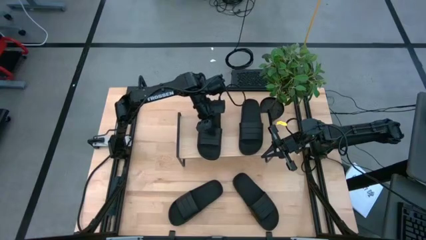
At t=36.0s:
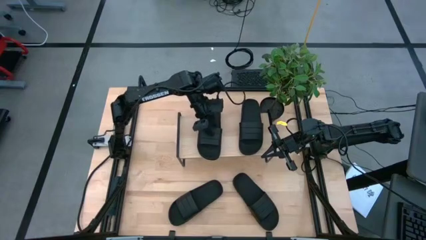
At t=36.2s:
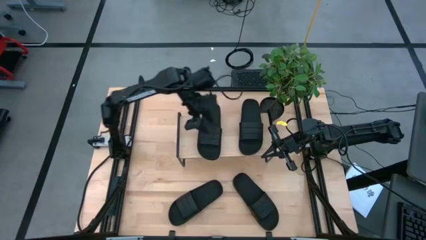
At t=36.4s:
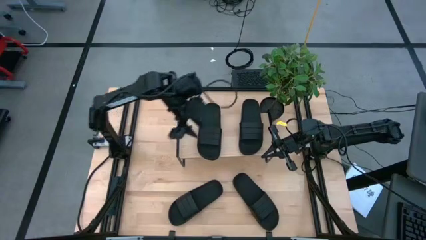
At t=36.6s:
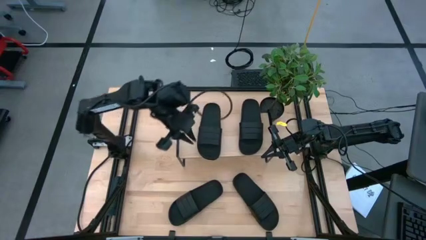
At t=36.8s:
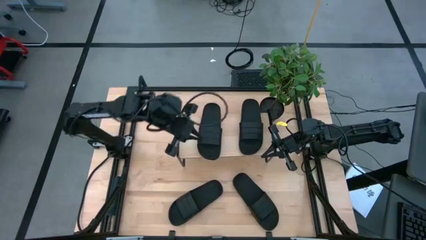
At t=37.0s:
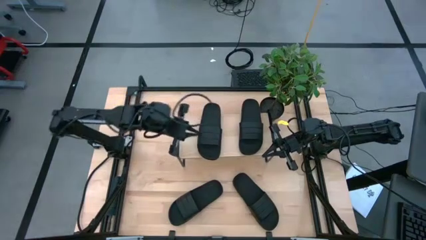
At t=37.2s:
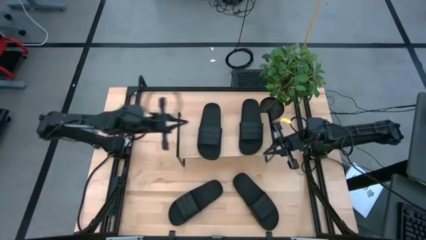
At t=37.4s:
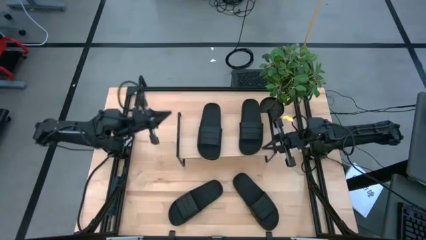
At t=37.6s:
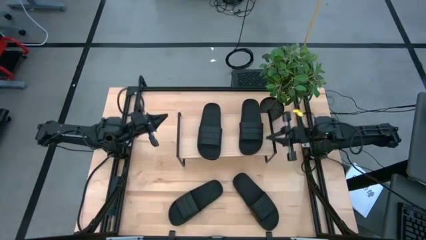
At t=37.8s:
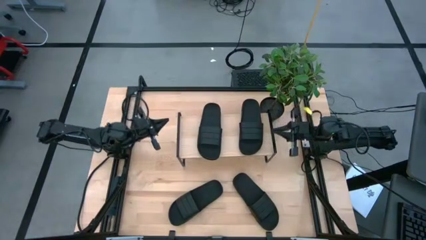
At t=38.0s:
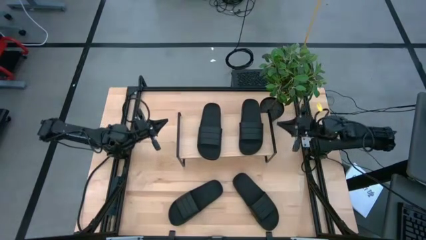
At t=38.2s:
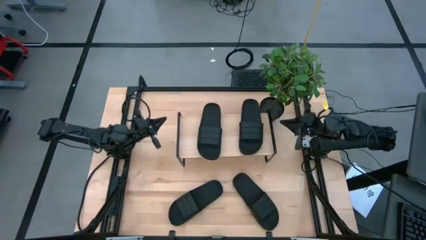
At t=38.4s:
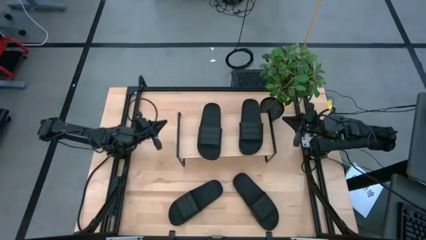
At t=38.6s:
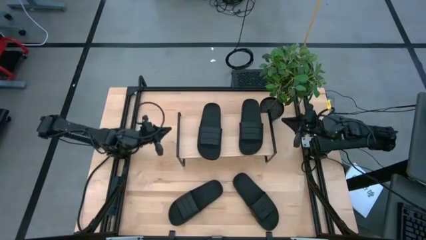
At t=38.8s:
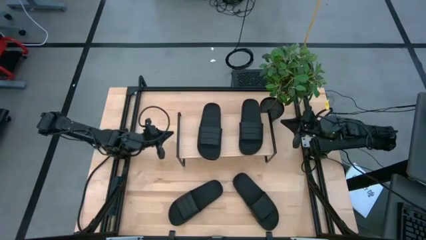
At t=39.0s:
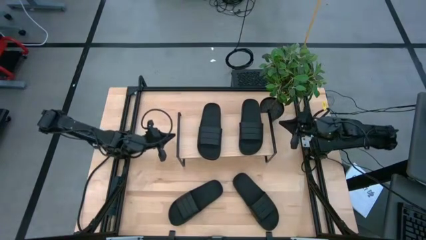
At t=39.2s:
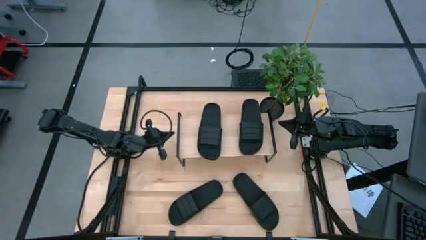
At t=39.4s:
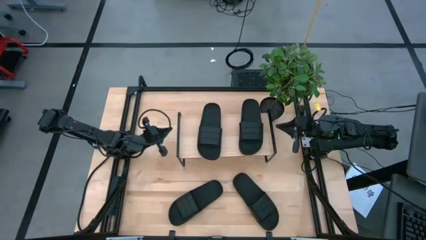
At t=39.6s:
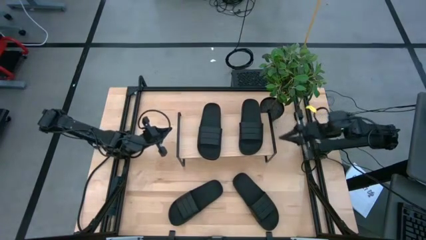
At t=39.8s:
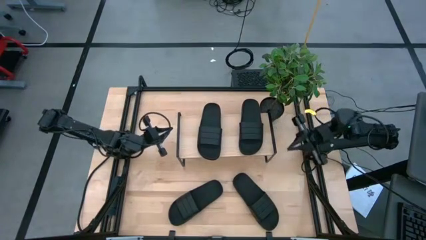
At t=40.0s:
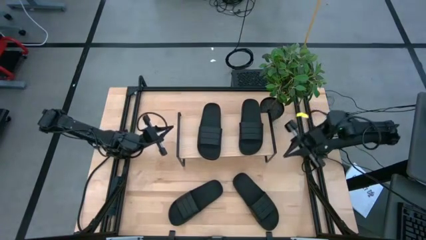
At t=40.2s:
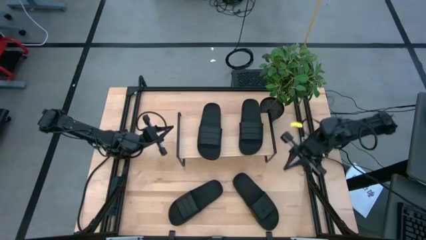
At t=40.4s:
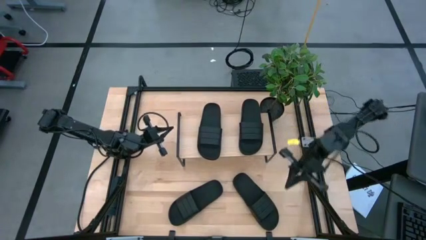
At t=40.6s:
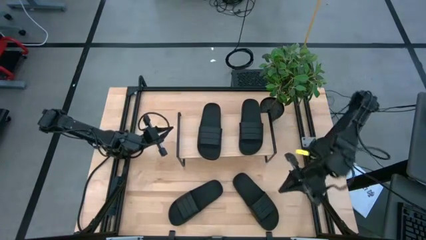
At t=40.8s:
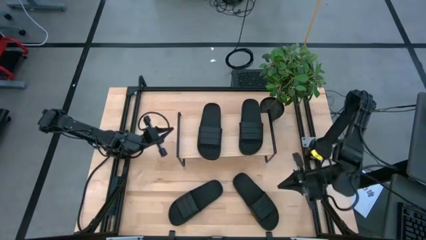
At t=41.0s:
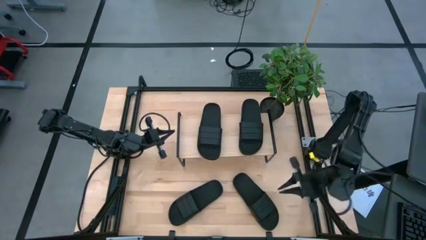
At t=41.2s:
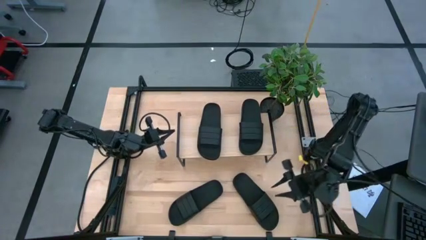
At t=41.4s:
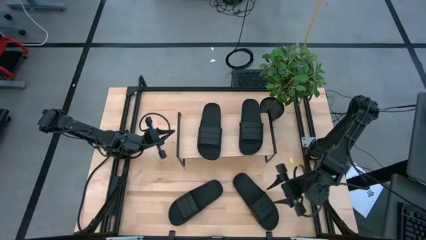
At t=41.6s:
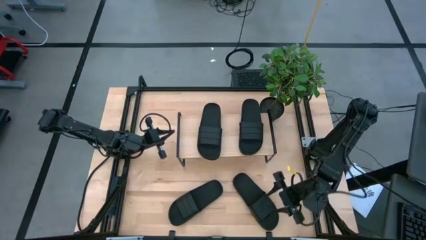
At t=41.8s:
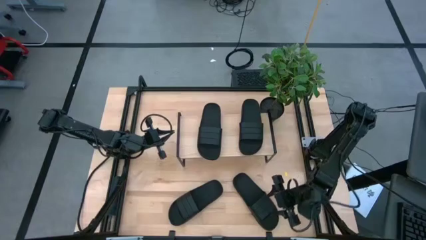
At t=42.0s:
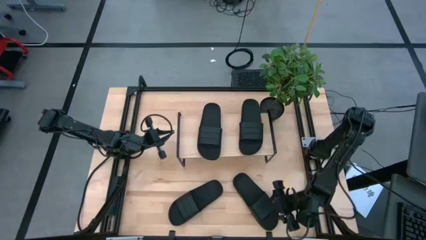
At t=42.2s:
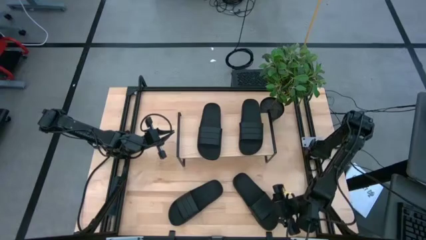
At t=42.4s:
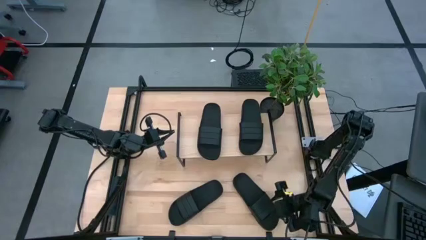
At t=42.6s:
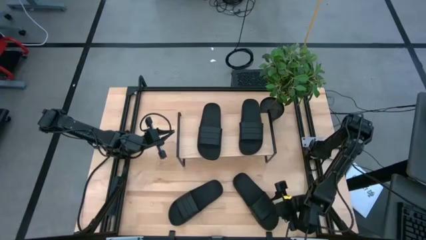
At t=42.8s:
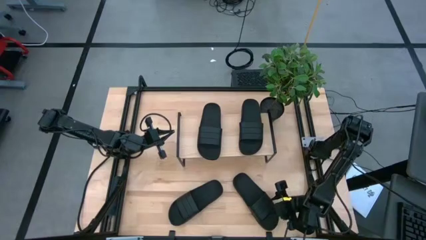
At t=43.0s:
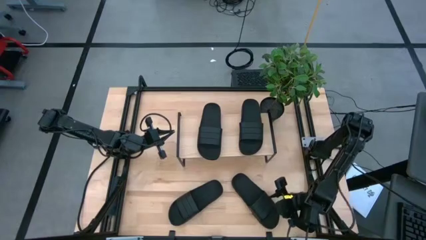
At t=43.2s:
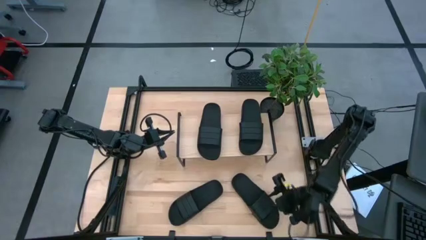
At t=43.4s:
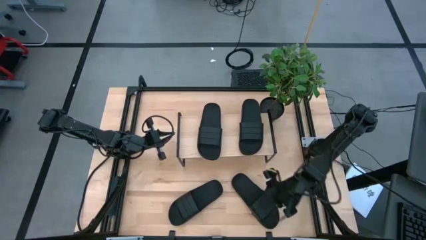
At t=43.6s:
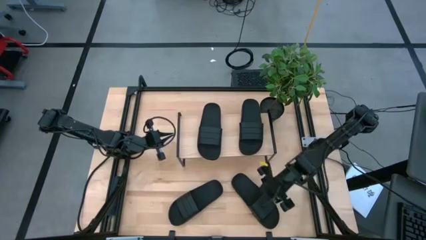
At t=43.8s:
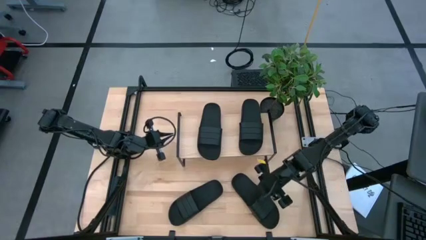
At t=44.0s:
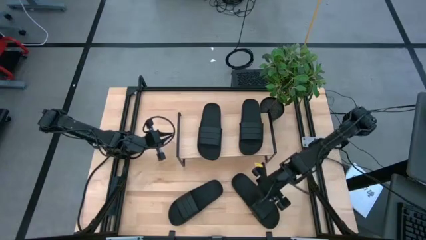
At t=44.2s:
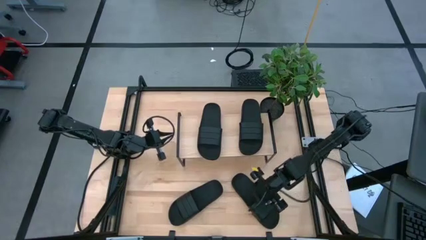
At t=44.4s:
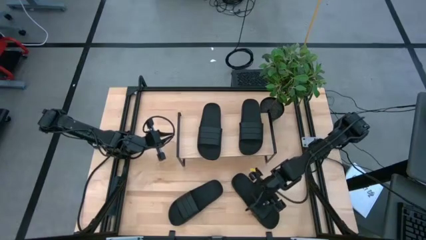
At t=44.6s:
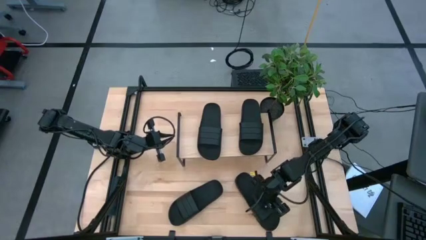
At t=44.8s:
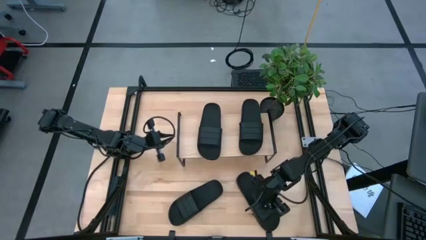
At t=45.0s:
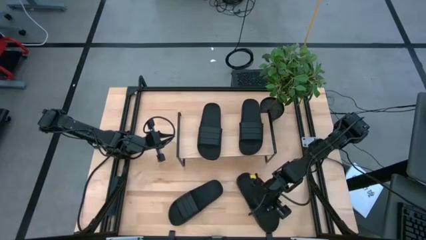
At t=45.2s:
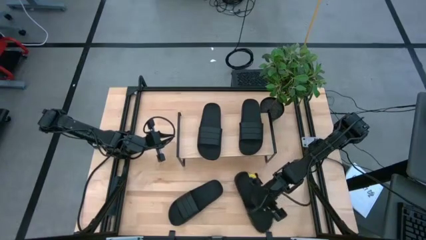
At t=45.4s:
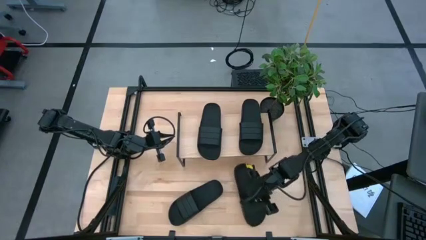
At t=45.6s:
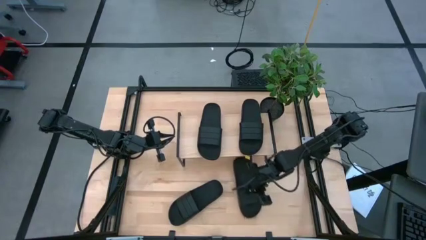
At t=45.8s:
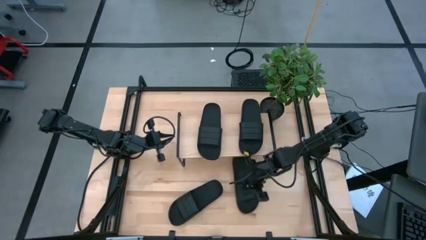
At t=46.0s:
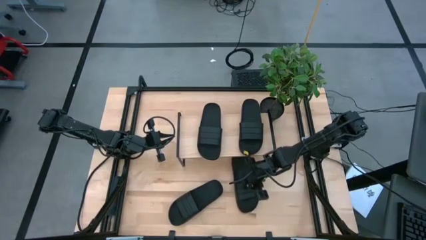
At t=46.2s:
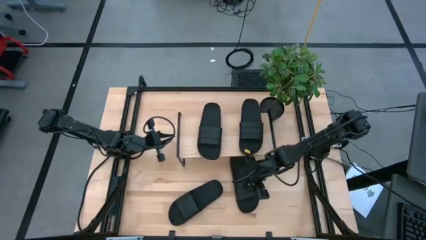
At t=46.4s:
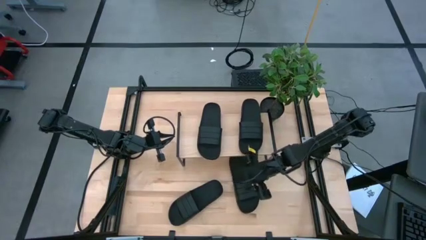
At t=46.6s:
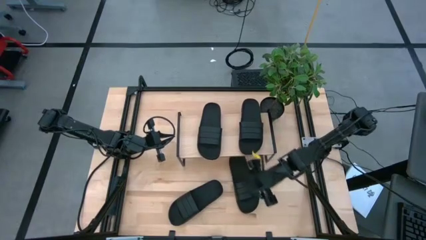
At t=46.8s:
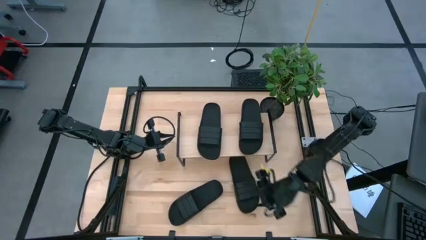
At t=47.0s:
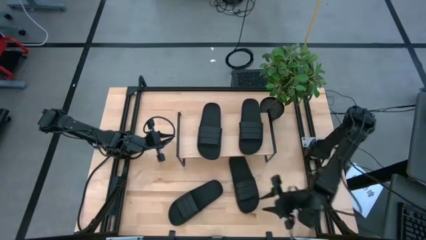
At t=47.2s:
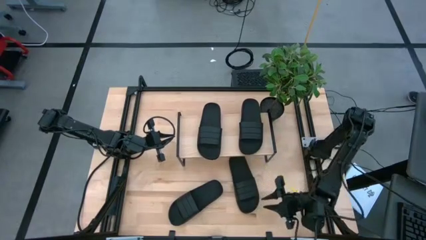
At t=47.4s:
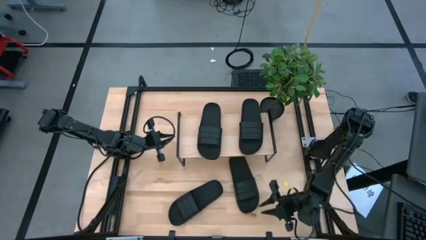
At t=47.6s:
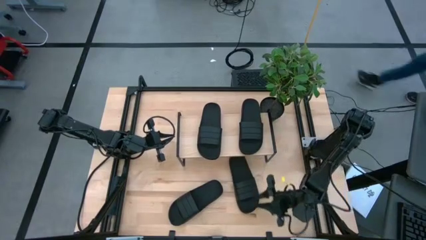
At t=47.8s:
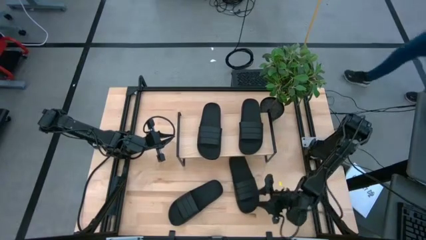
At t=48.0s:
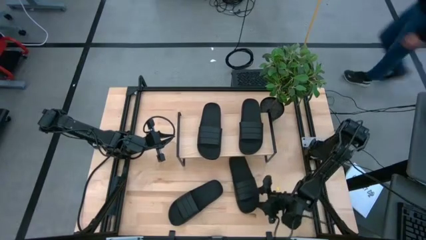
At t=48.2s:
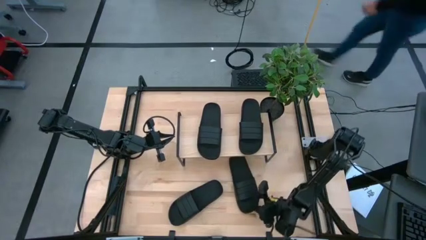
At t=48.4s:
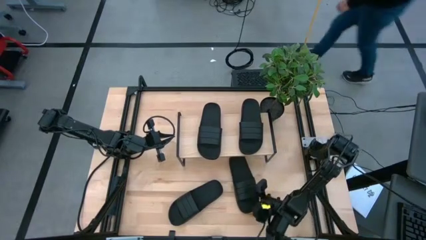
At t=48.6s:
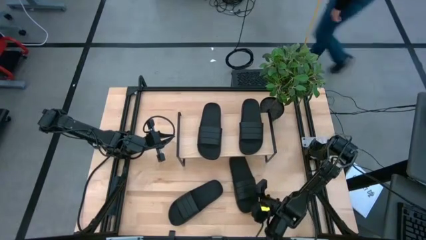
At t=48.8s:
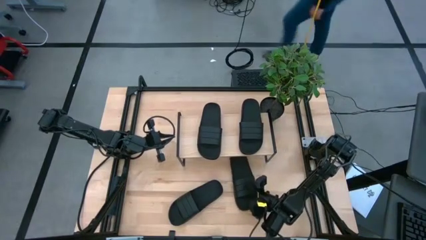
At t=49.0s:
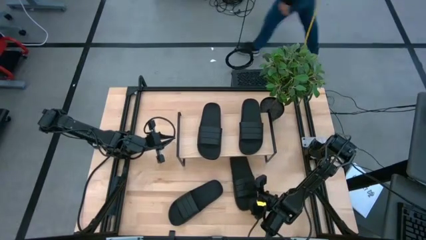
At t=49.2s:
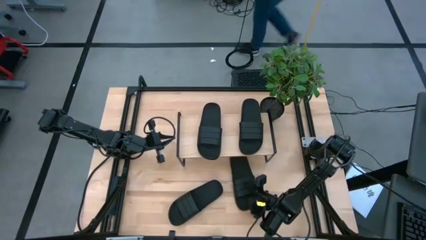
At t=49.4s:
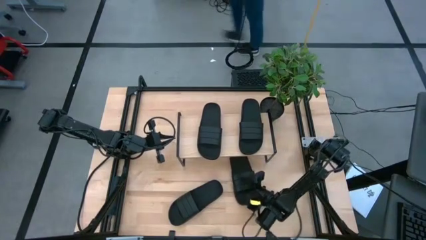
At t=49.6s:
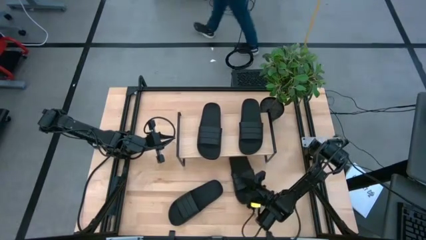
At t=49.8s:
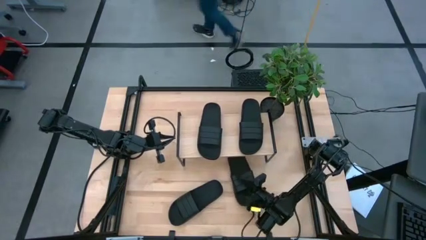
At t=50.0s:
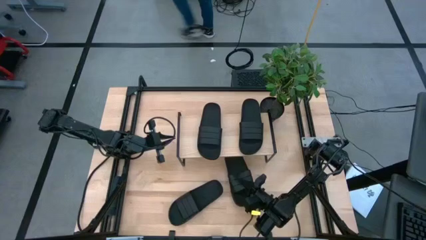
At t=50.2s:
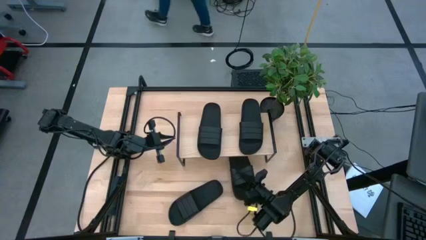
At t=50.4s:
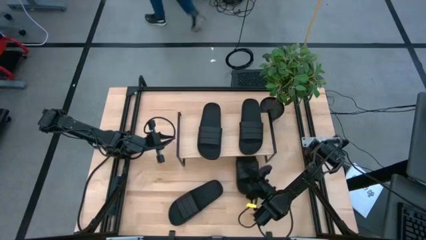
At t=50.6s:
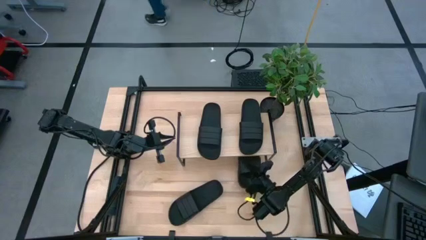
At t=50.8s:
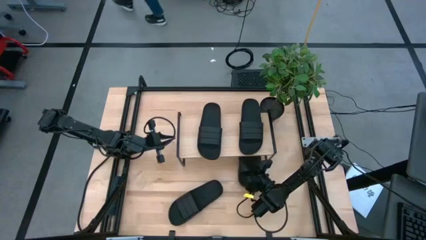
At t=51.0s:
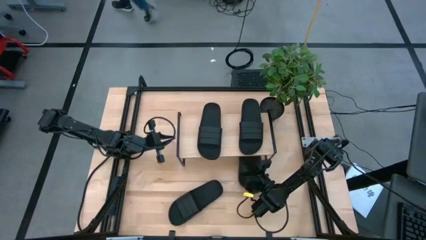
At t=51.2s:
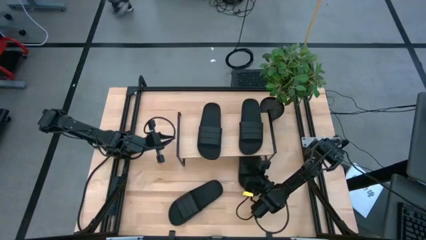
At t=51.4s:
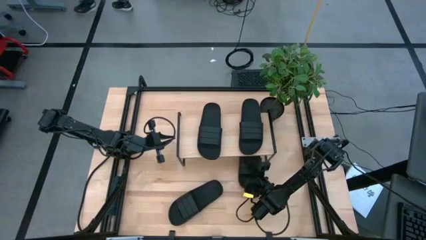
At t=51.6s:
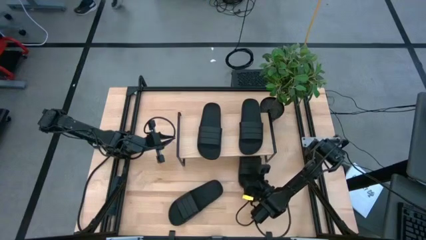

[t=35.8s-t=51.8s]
Task: Pick and place slides into the shelf
Put the black slides under the shelf
